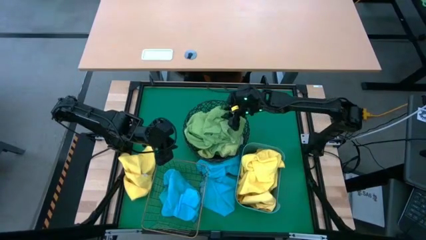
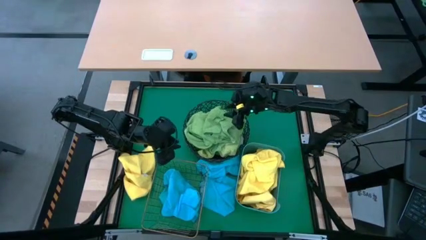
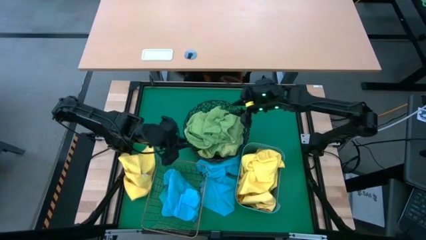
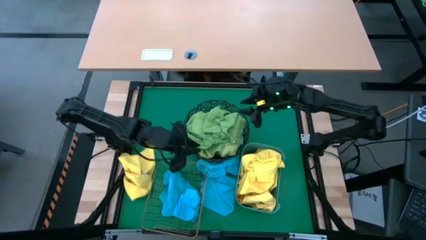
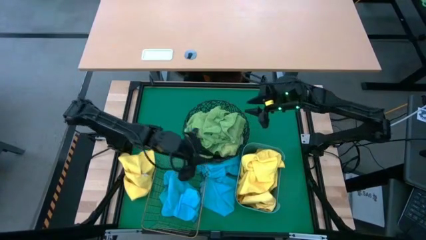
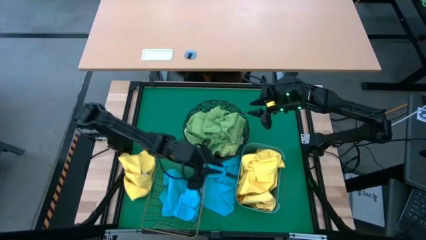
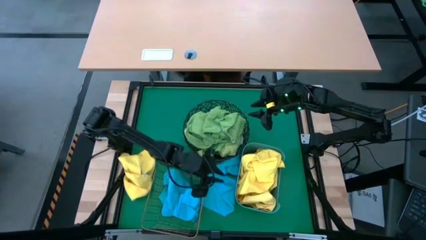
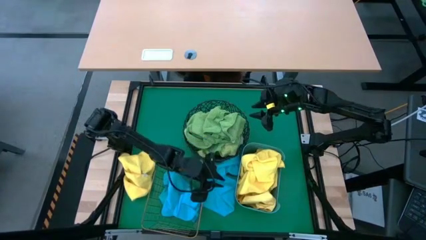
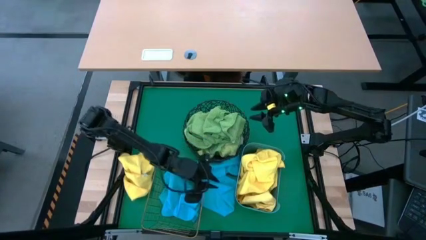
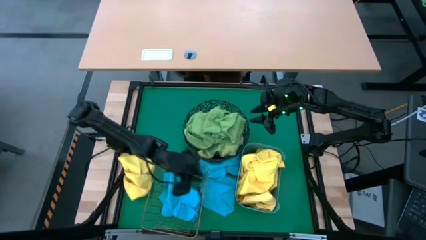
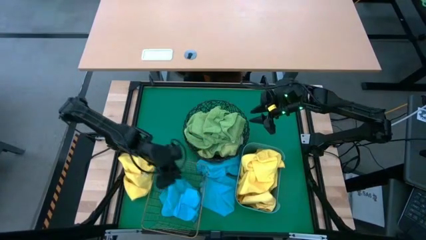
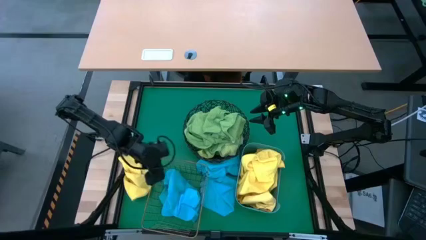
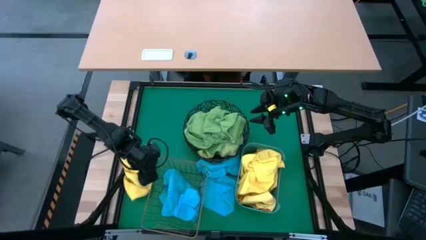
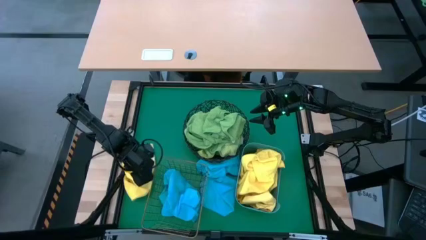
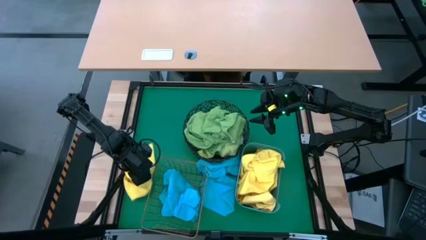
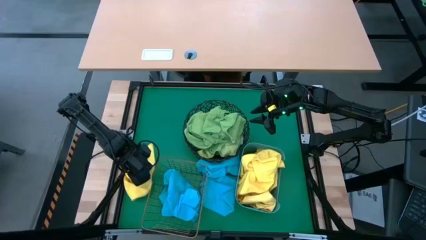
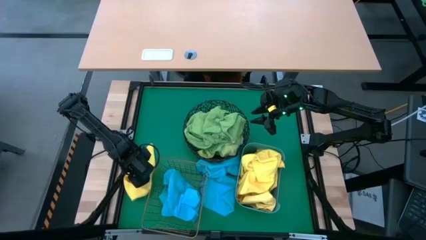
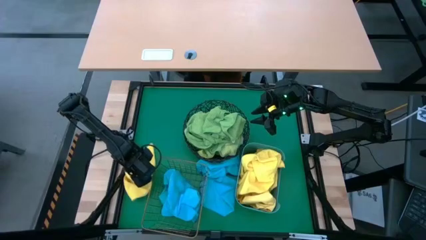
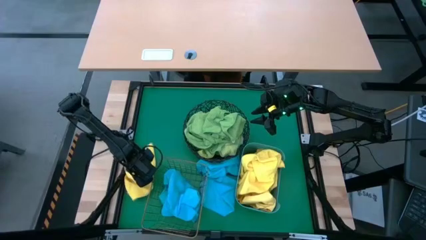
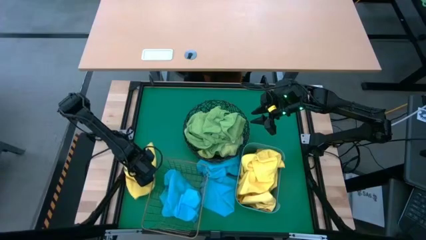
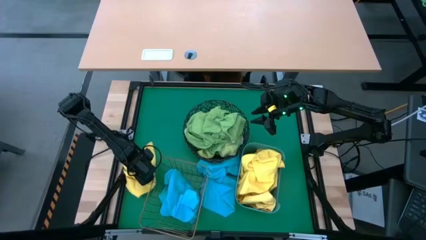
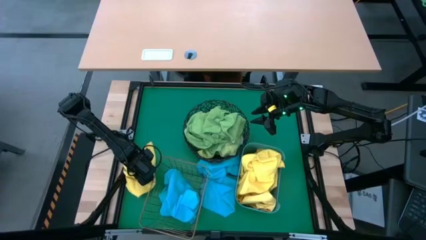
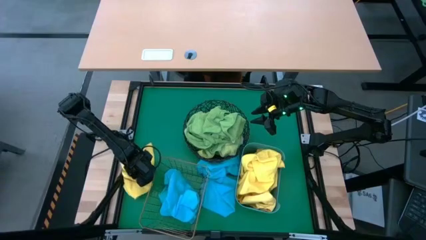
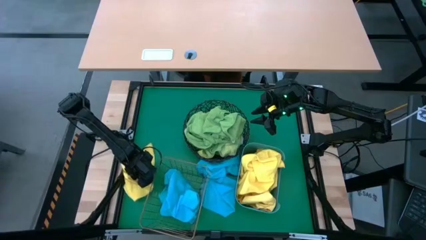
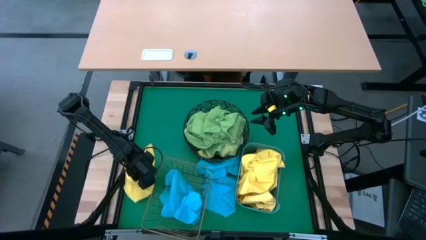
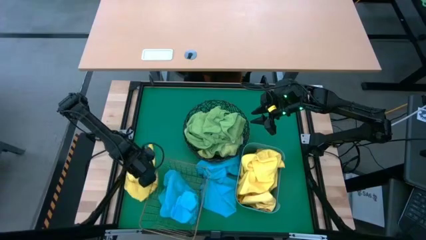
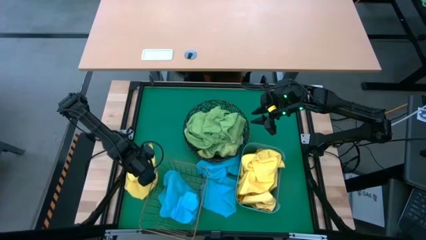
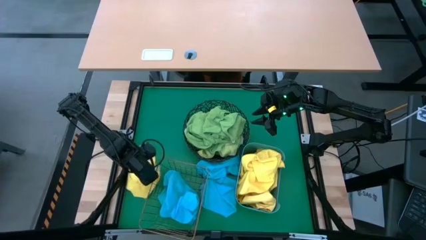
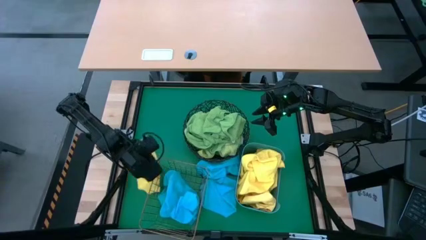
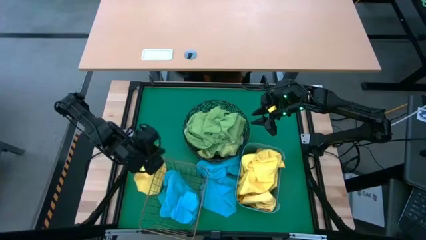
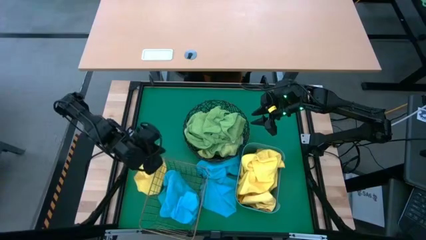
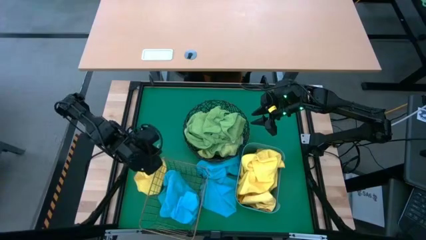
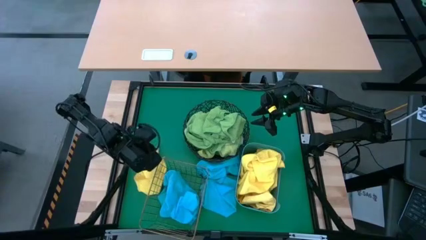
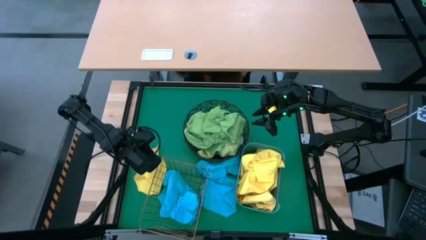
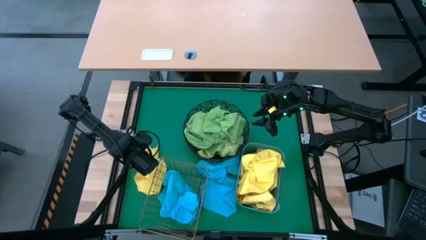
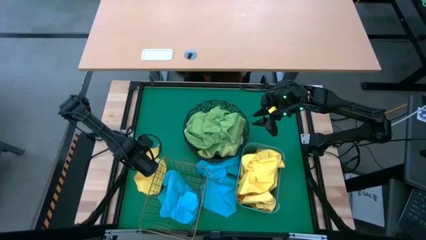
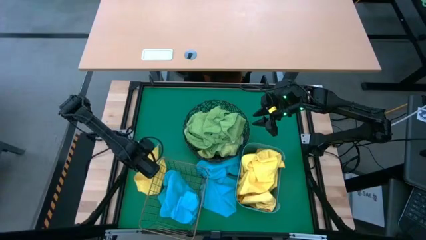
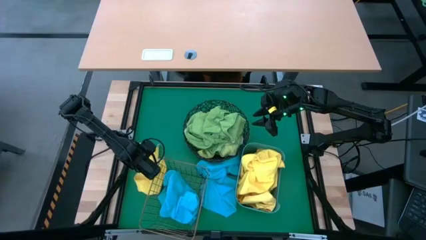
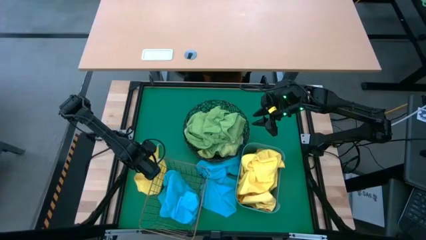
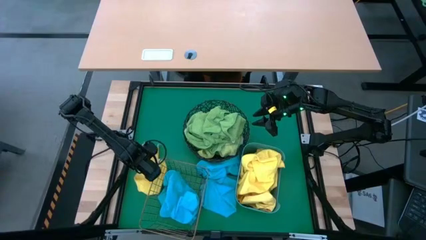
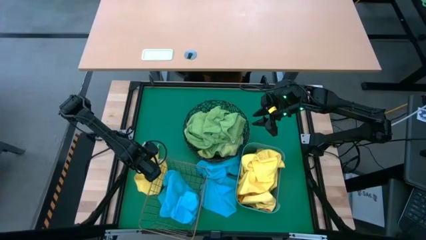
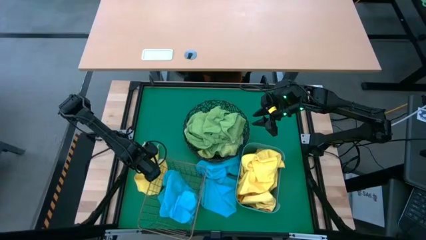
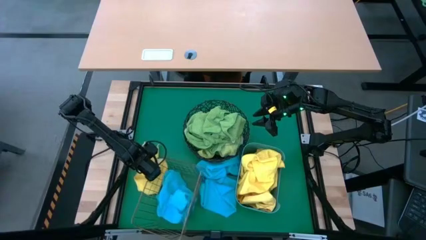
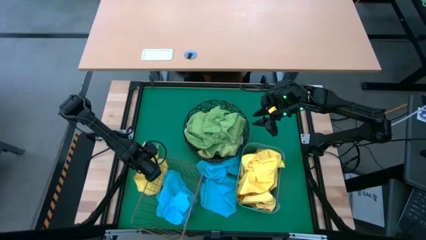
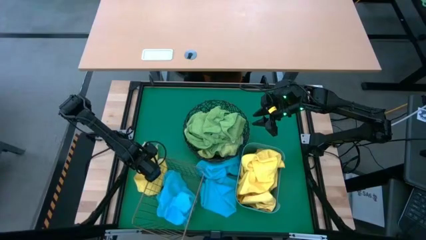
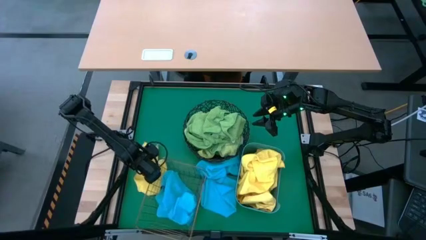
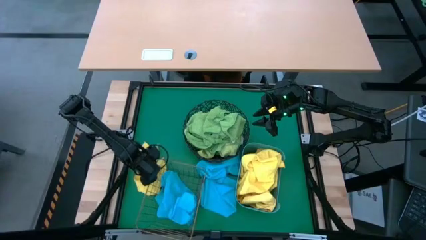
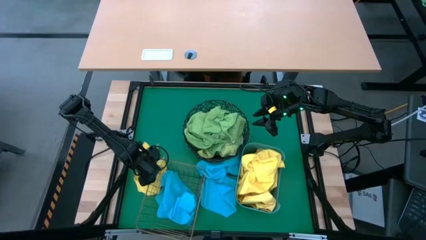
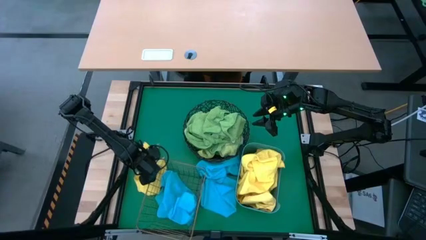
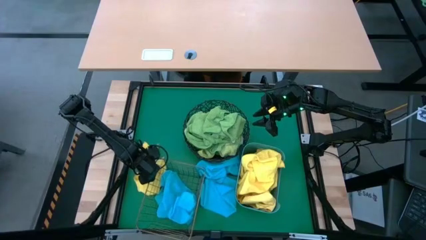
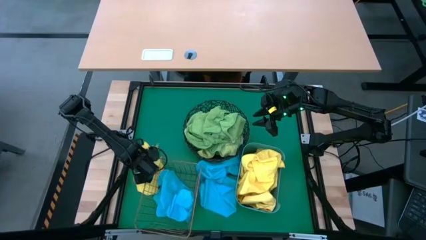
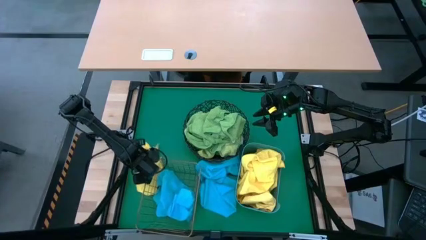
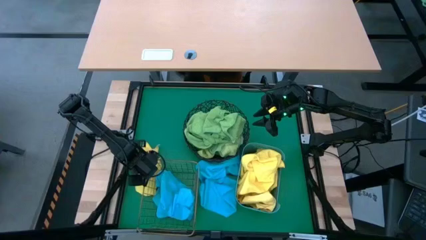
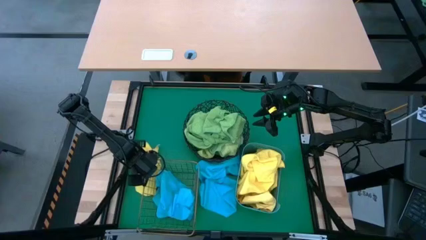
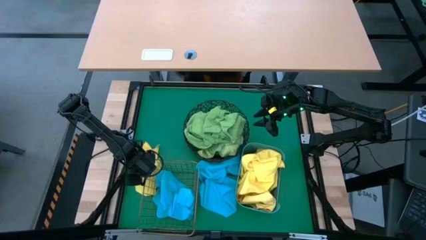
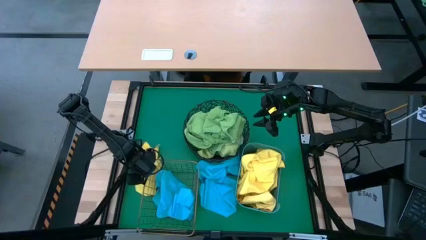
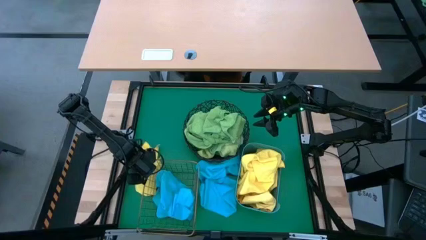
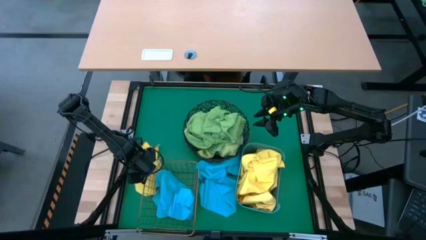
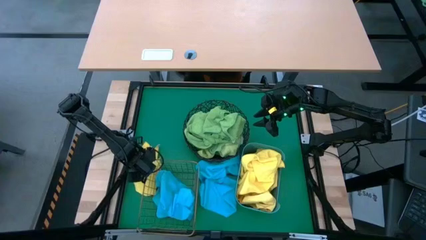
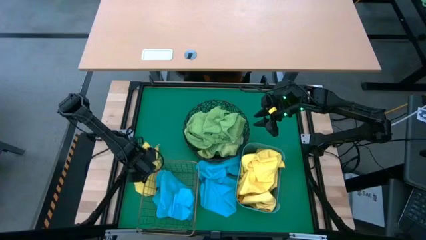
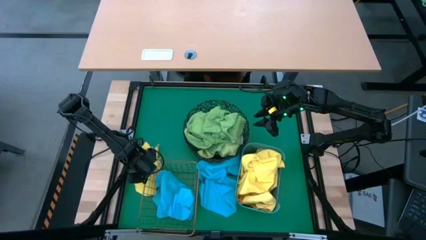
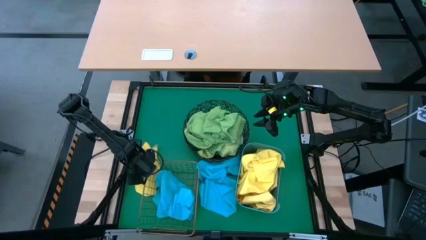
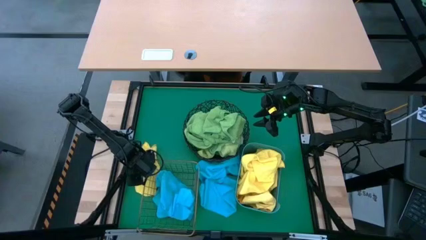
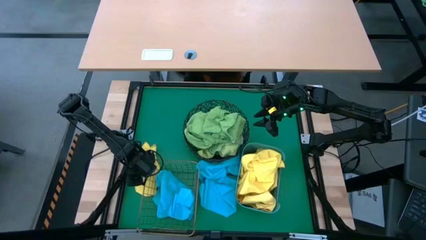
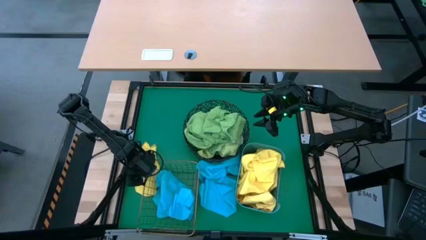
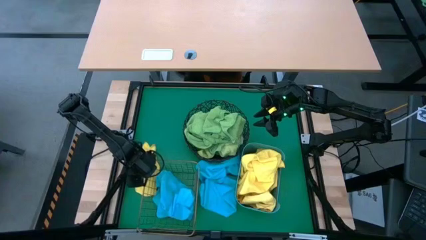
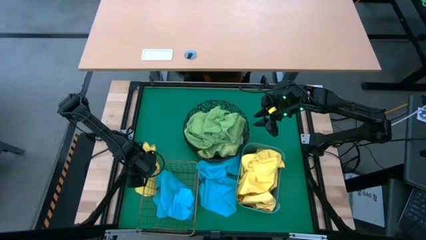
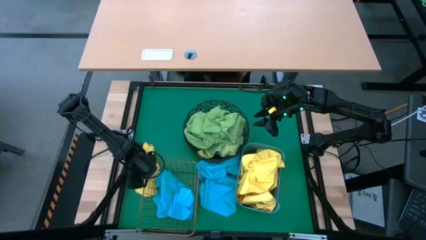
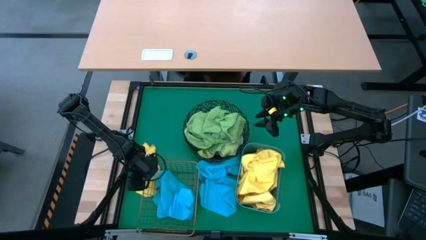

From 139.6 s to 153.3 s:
Task: Sort microfiber towel by color & place in baskets
Put the yellow microfiber cloth into the blue bin
